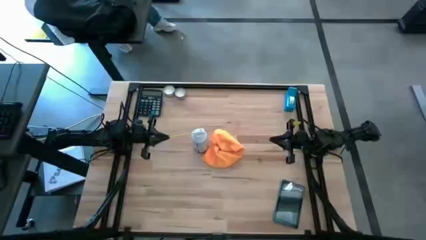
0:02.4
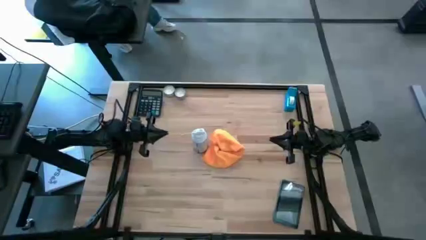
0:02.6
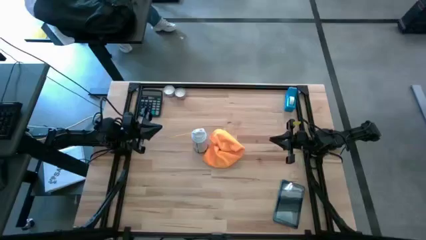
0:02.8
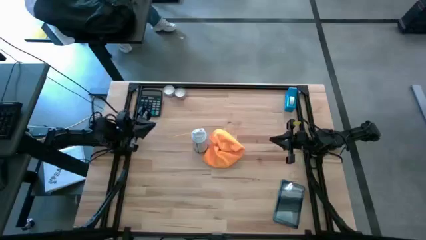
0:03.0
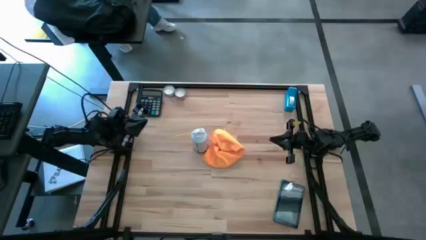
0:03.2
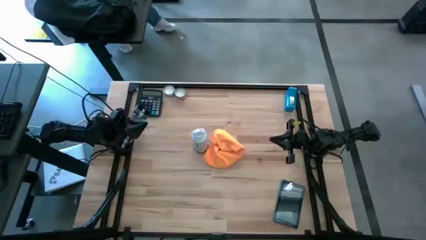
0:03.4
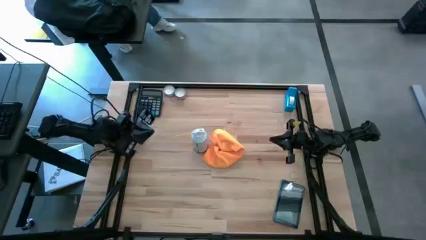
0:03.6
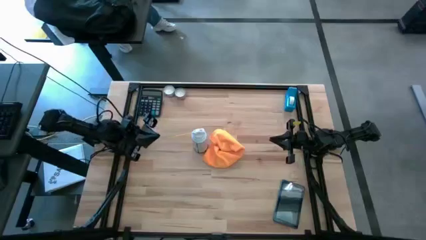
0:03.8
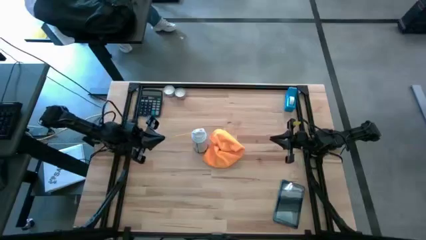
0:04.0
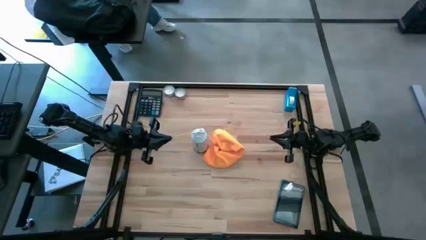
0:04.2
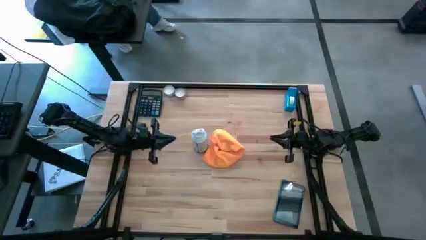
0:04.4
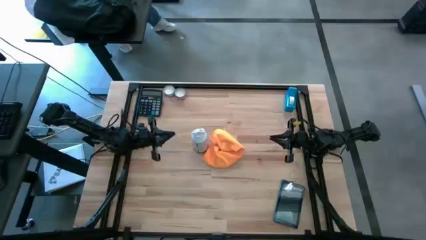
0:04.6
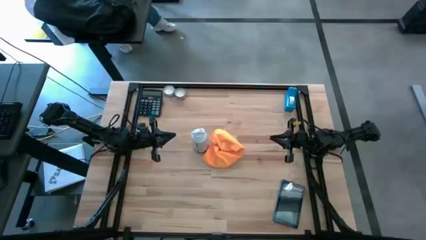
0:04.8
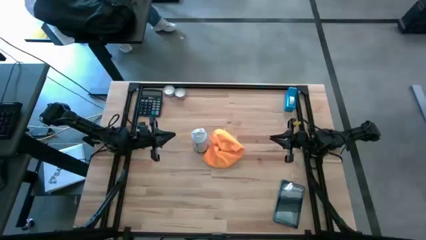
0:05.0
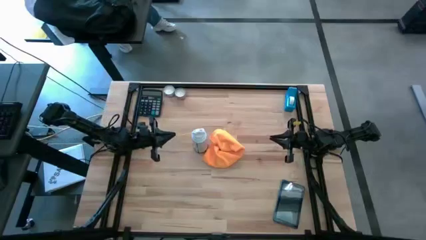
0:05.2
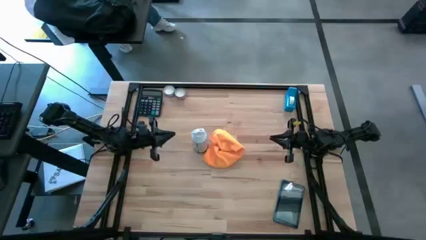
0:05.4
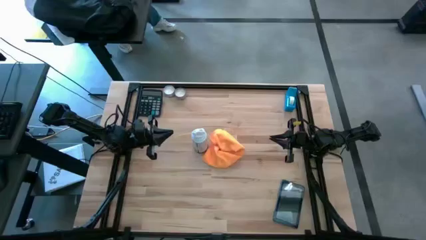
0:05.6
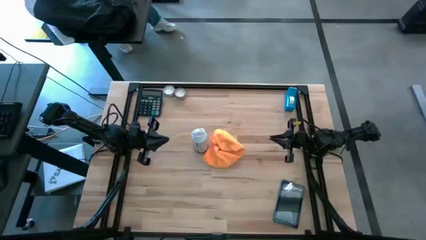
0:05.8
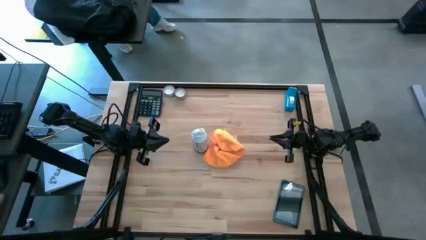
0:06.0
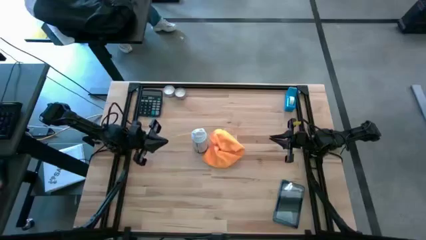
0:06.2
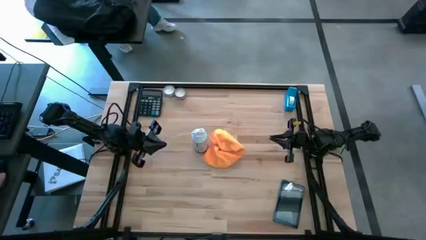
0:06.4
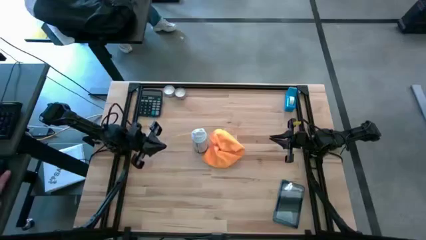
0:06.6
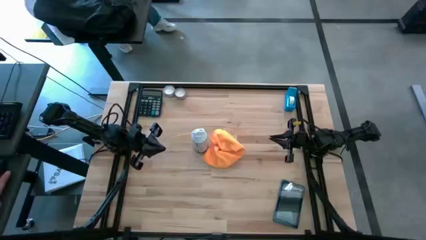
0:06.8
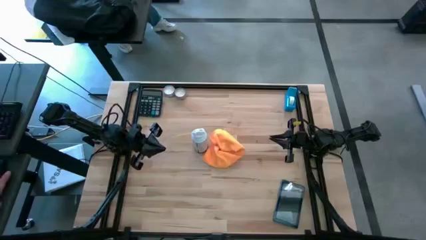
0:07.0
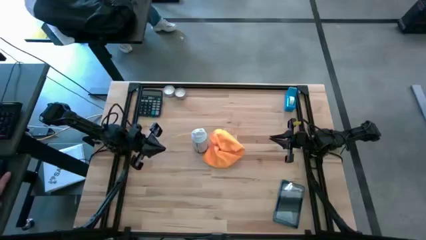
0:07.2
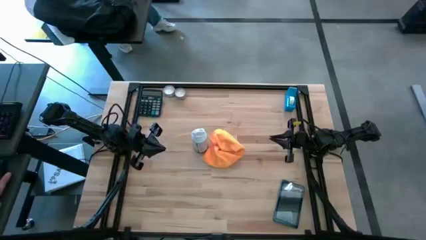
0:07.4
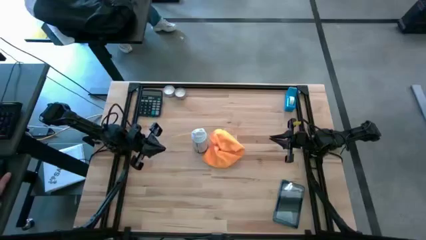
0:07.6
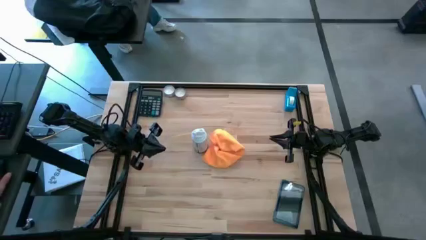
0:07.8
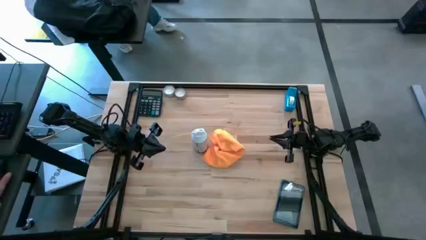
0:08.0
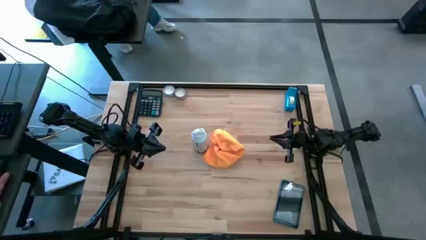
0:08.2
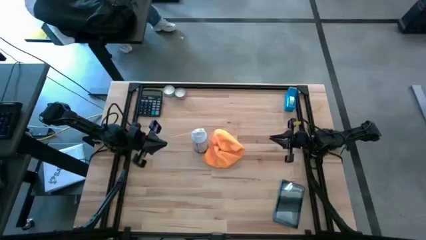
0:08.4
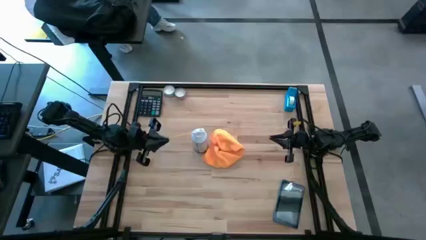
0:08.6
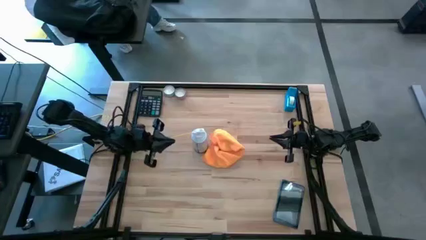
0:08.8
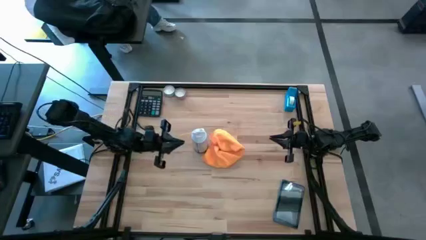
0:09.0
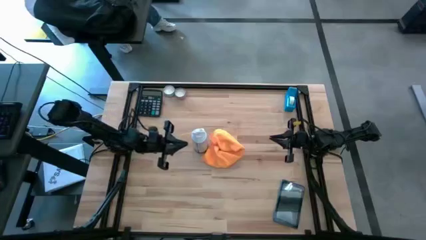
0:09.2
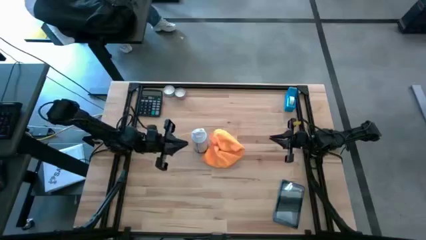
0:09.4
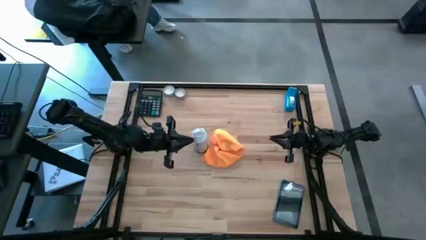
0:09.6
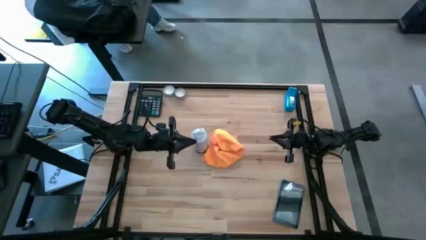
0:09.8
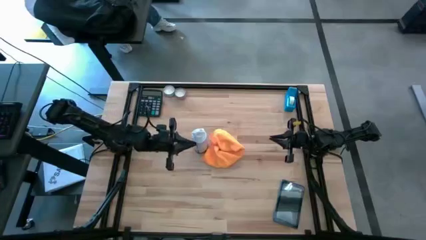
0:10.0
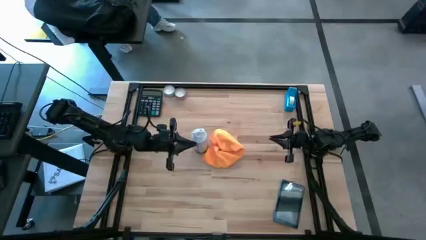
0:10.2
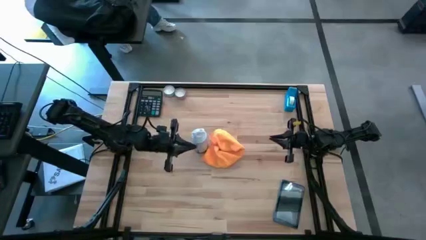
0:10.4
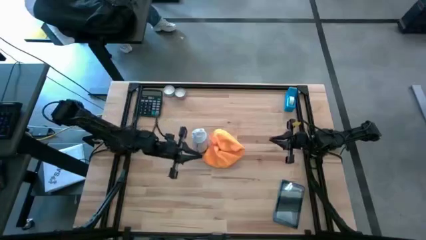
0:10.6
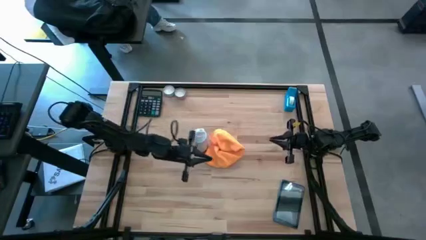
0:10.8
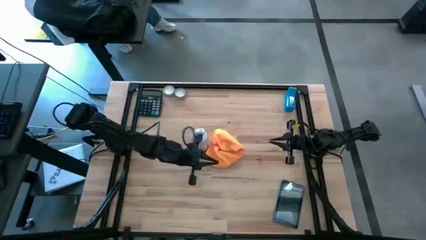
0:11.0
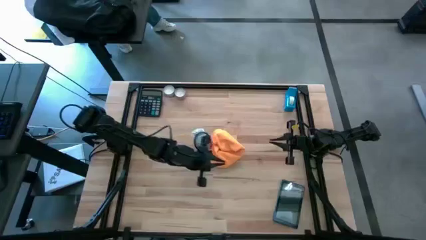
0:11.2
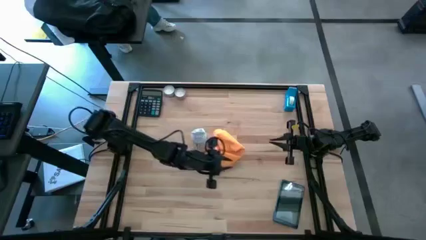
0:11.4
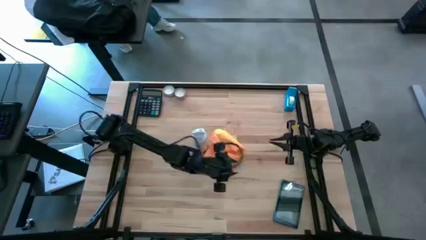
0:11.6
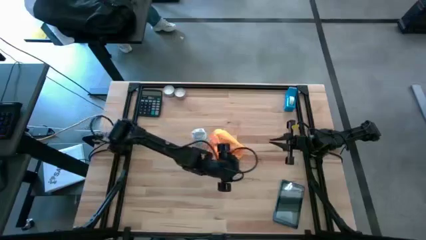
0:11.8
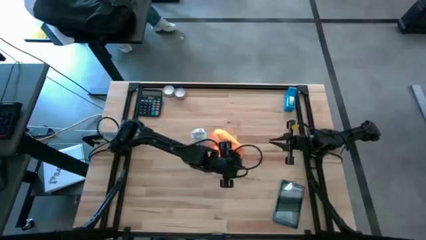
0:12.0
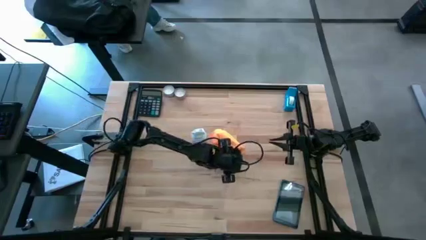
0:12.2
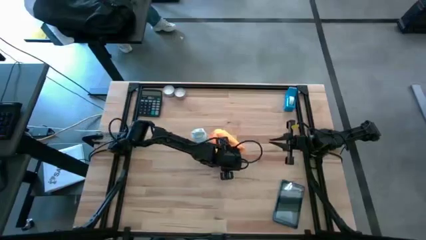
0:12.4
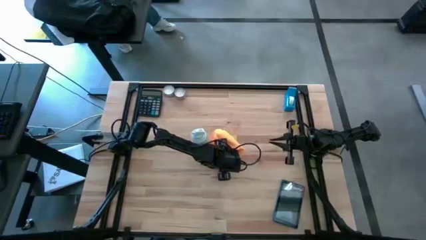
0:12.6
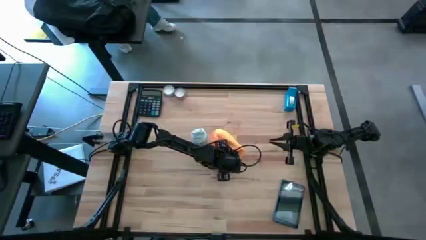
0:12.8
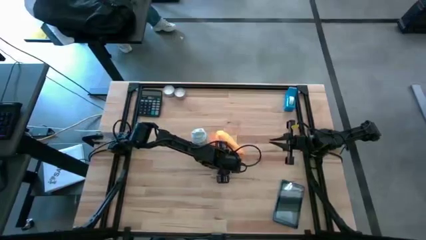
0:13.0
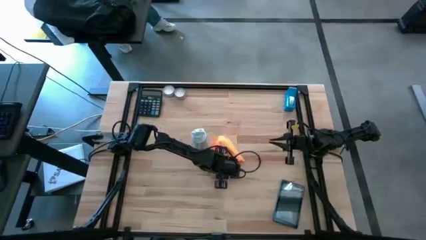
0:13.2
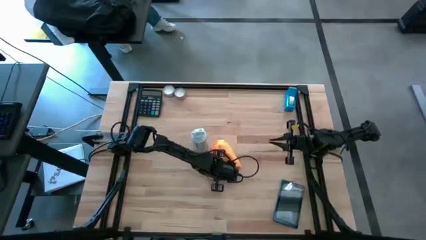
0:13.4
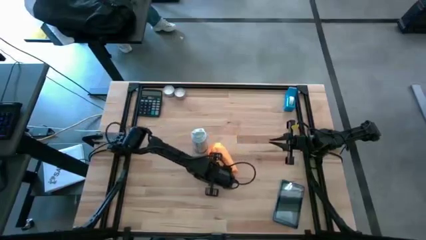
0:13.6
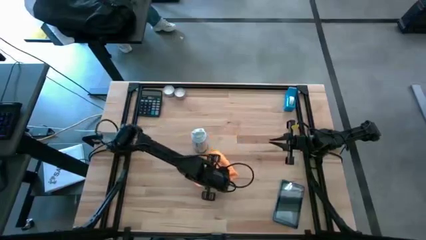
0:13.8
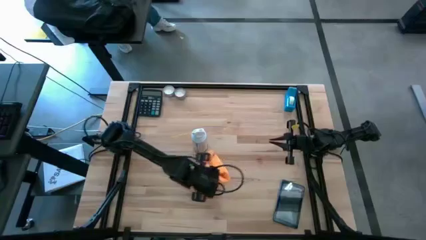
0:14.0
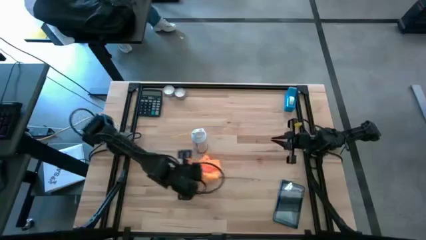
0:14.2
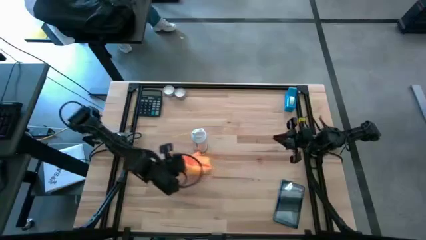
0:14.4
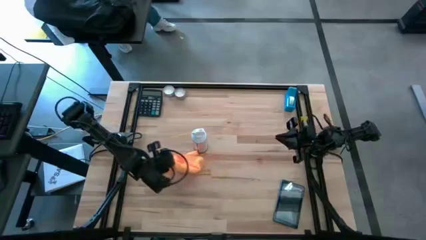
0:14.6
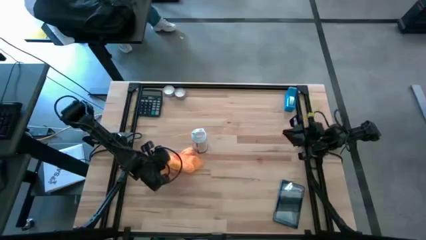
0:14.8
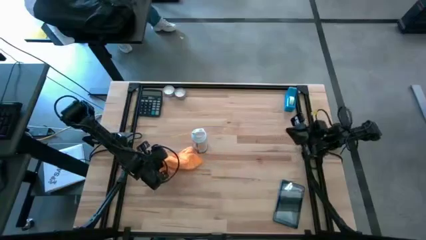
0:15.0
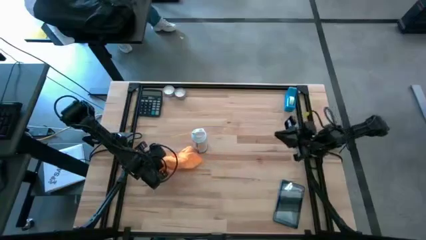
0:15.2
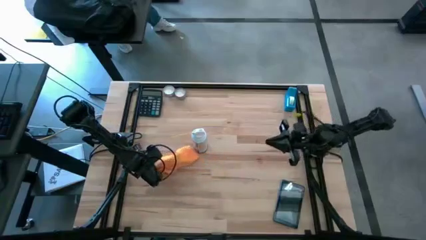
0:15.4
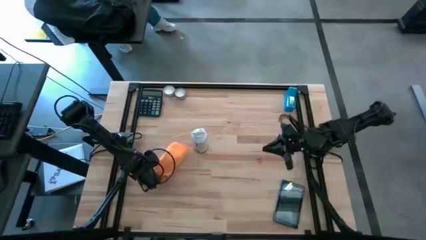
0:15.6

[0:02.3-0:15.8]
Task: Apply microfiber cloth
Move the orange microfiber cloth to the middle left of the table
